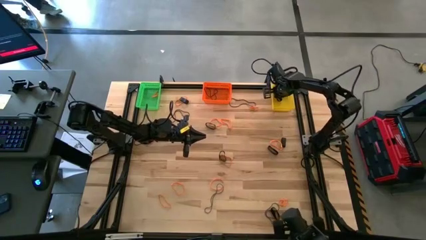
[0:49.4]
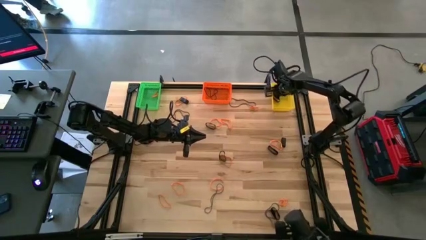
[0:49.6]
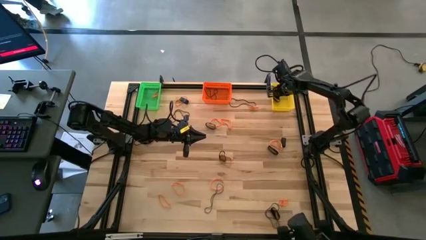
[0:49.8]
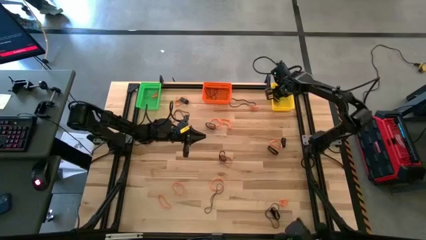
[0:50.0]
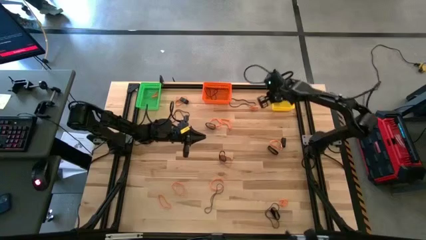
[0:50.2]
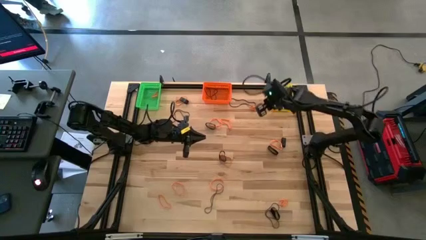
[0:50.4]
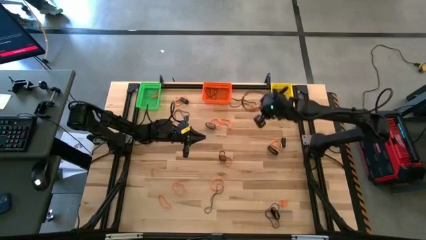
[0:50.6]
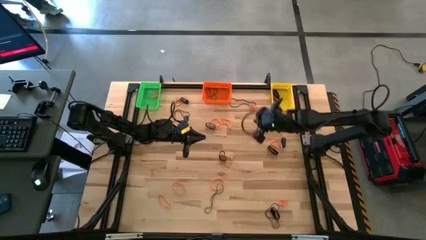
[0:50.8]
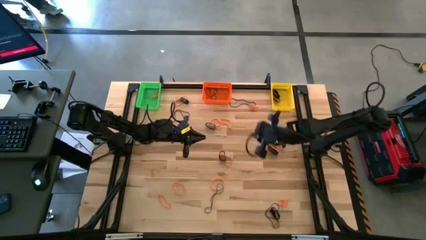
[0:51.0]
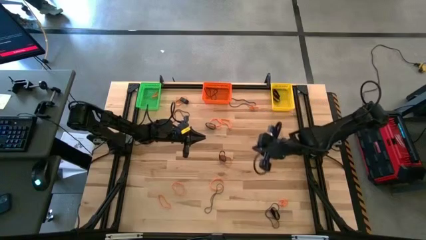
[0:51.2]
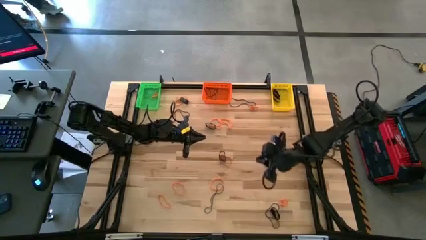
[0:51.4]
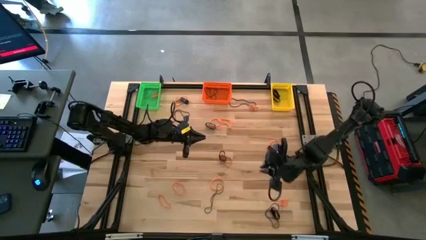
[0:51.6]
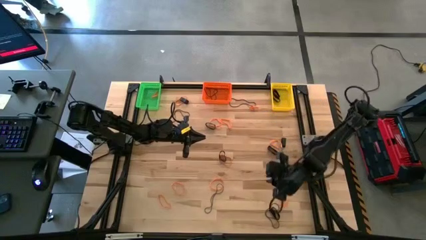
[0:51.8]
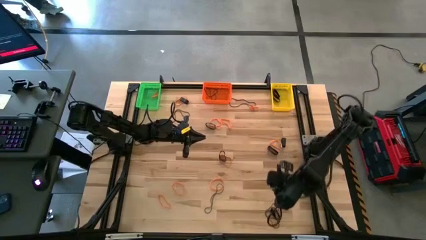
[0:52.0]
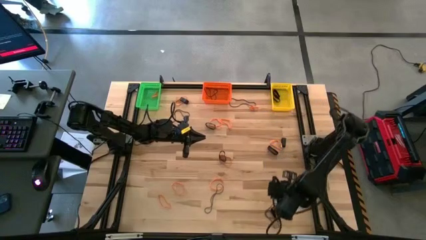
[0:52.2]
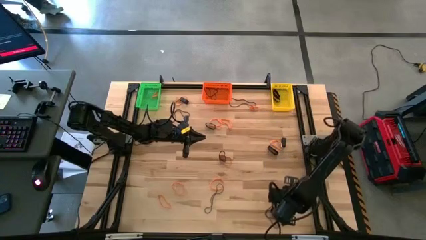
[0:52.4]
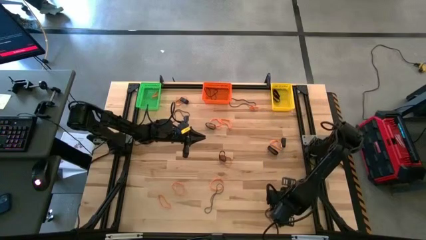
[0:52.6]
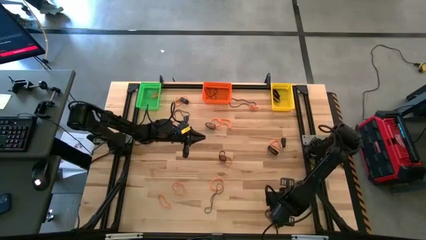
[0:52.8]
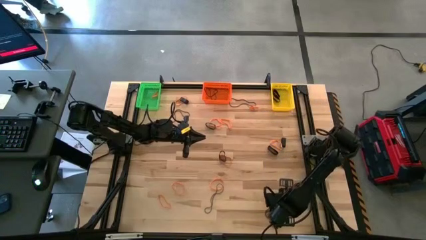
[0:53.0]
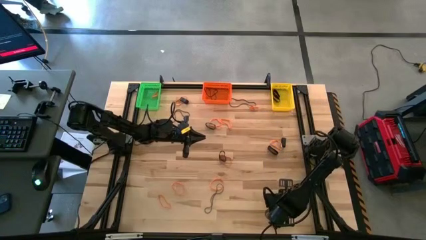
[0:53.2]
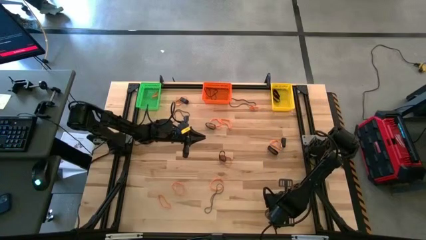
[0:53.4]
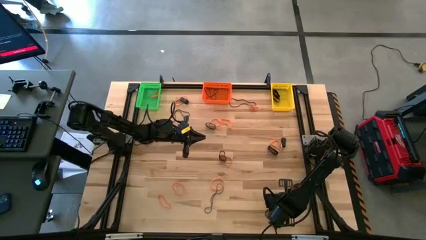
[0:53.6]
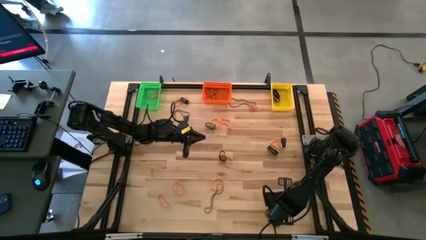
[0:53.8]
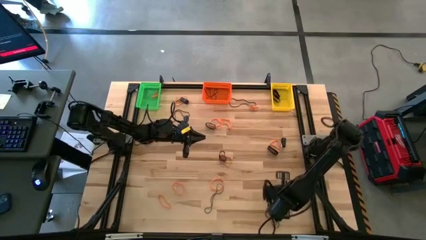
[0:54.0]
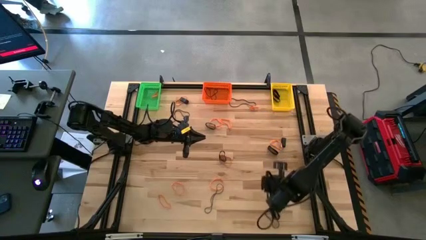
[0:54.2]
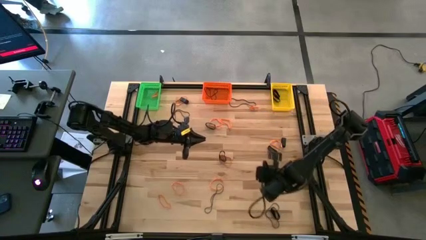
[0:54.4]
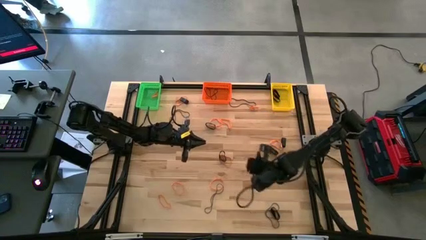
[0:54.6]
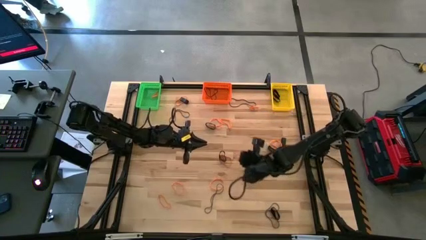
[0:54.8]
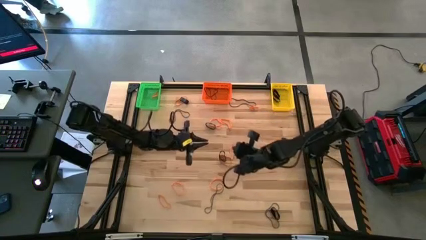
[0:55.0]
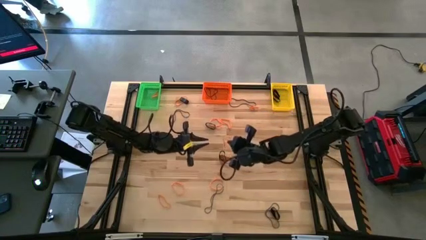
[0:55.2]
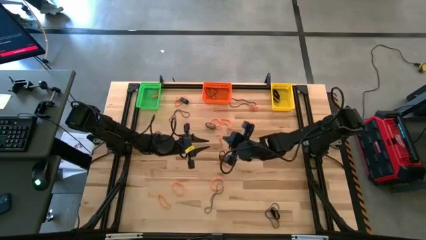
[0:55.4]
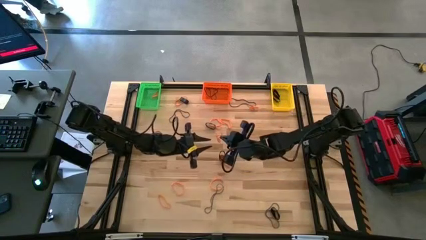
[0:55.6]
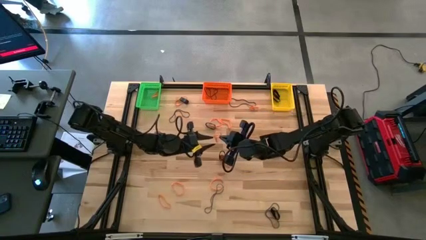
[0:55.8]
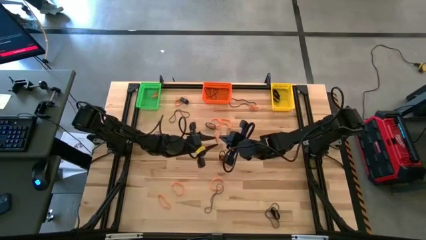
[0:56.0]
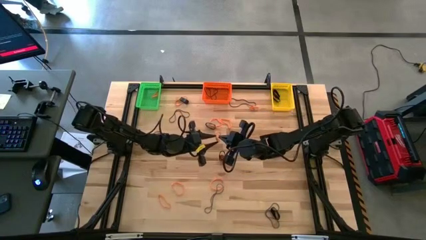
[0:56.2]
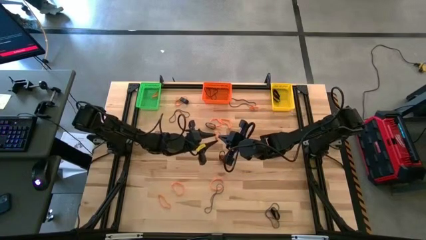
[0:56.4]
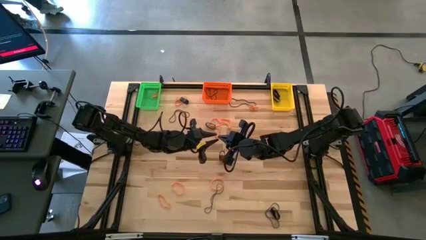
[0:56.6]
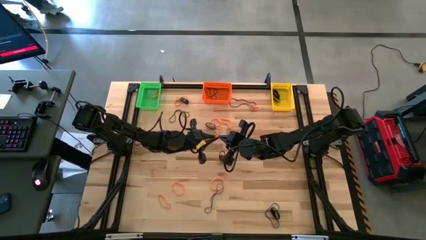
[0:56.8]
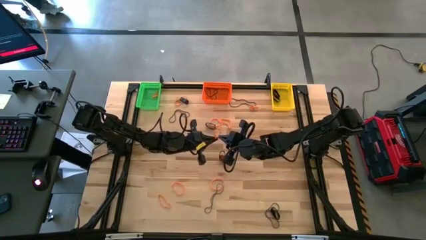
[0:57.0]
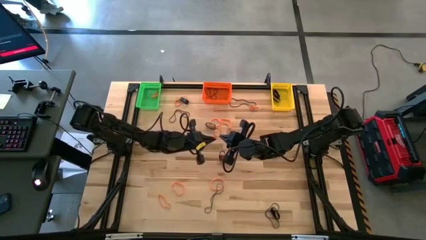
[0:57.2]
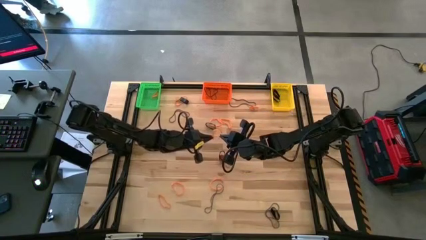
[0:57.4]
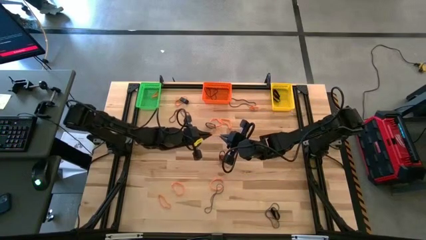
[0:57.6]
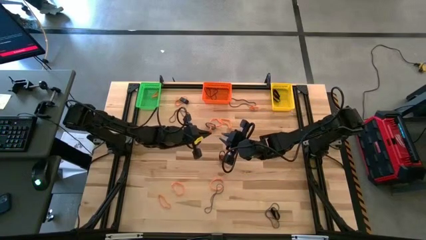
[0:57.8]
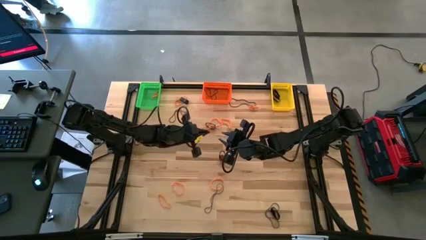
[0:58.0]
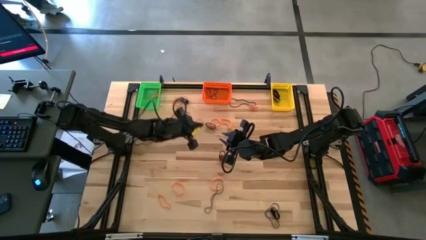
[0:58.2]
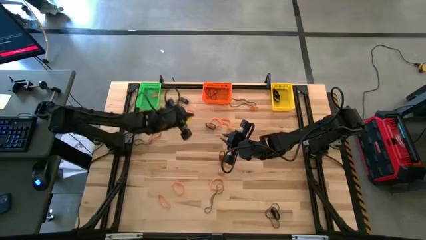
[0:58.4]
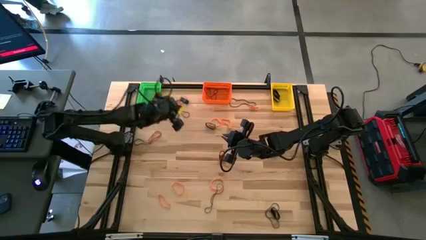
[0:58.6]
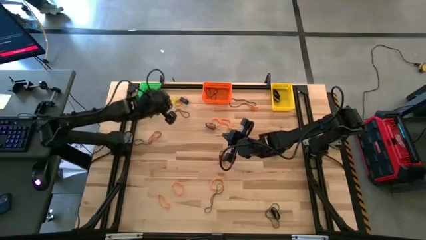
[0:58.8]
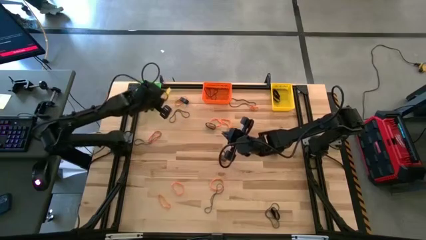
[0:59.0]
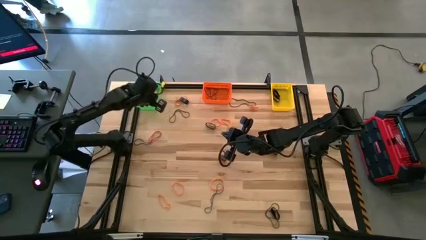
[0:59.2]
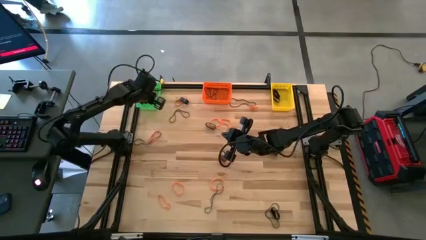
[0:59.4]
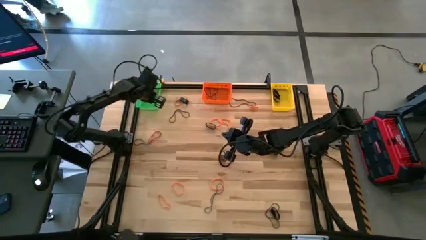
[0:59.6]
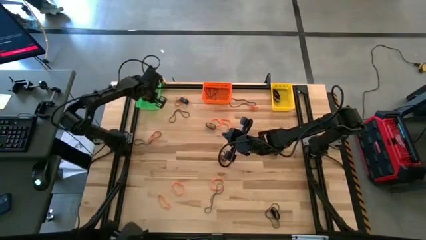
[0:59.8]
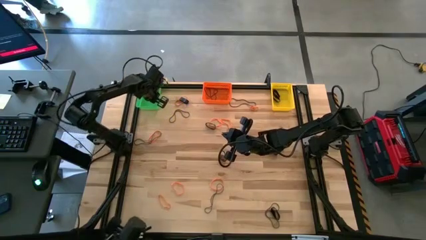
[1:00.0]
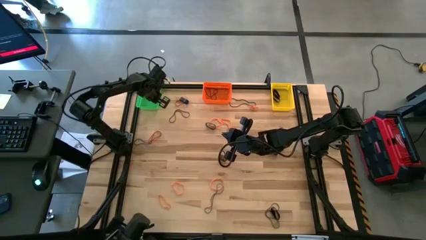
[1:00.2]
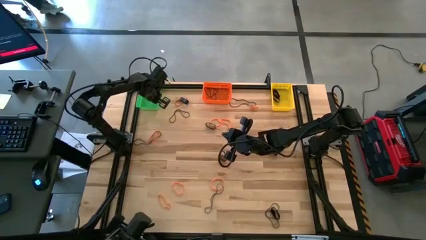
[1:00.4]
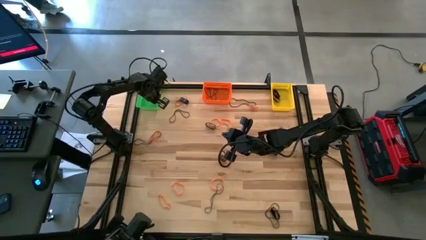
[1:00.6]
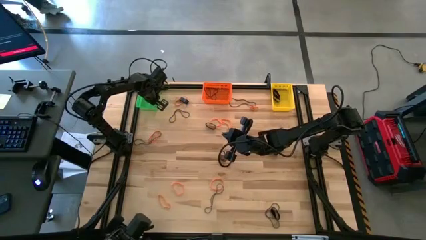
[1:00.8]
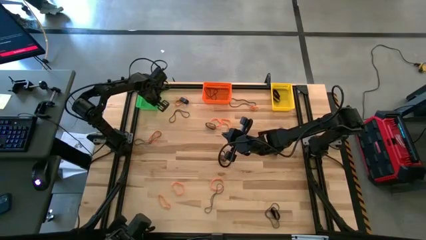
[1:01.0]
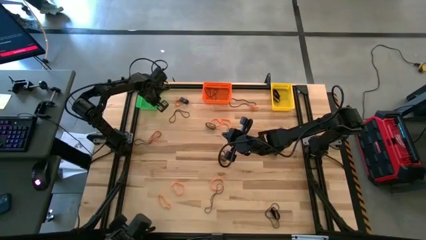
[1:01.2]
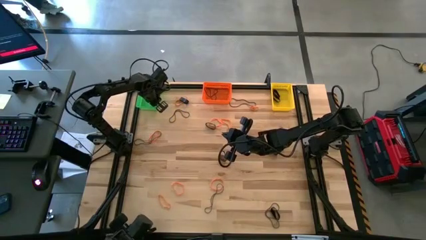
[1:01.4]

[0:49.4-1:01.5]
Task: Sort rubber bands into baskets
Put the bottom right orange rubber band into the green bin
